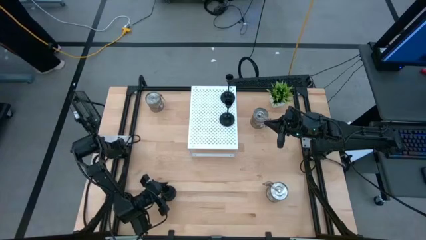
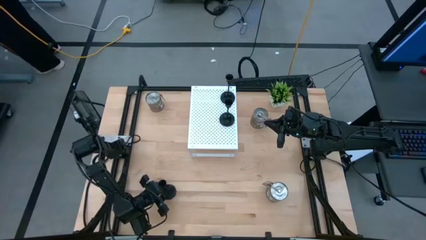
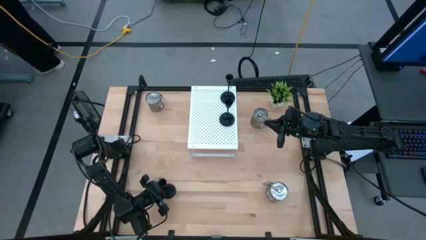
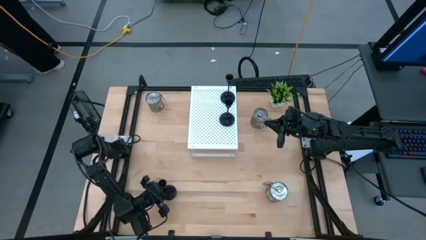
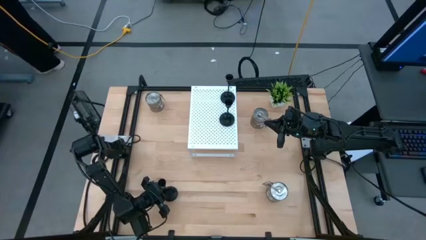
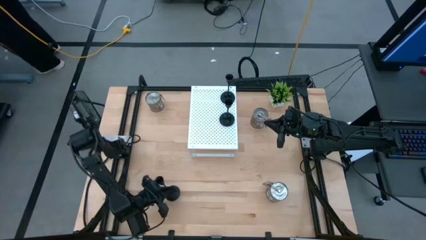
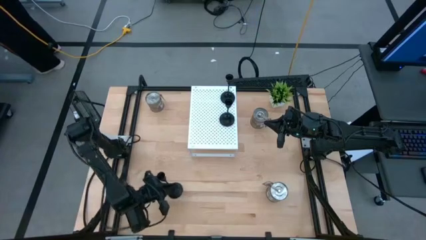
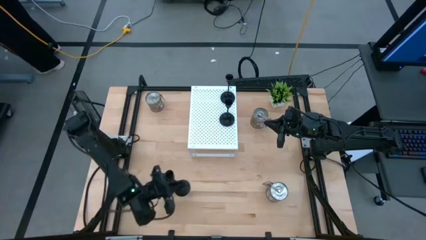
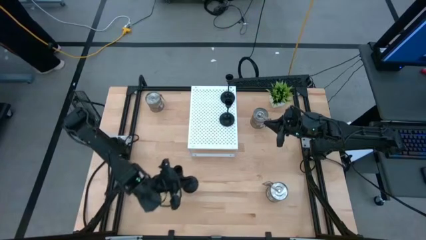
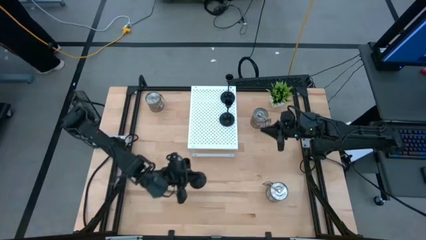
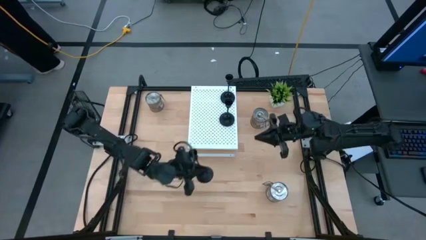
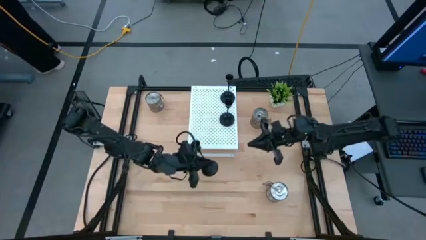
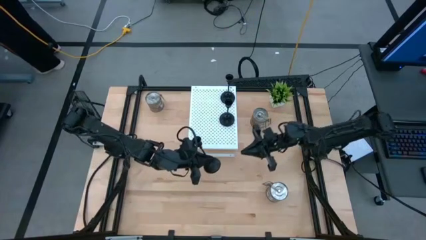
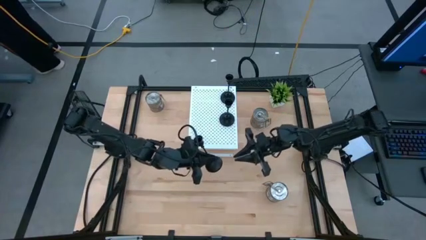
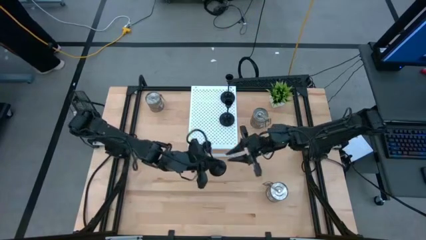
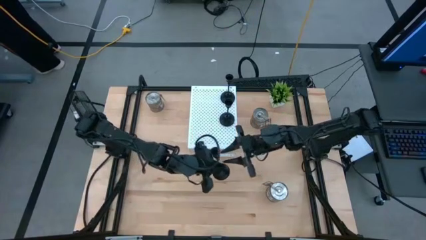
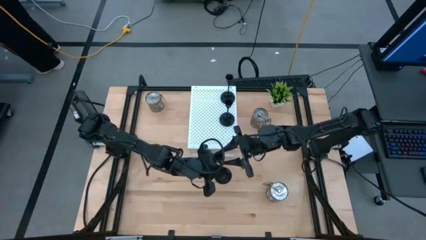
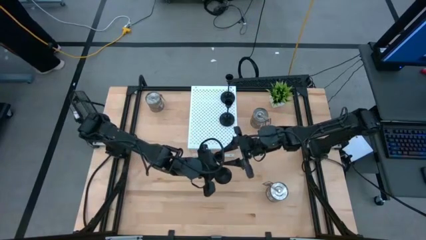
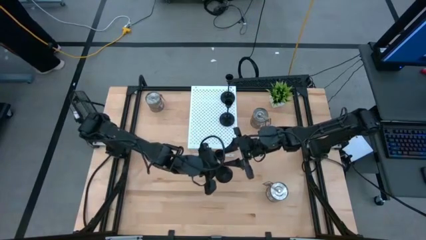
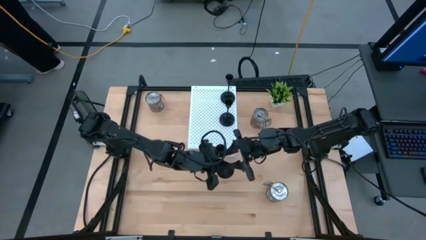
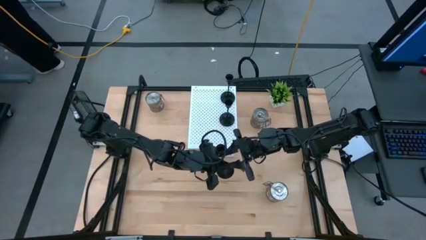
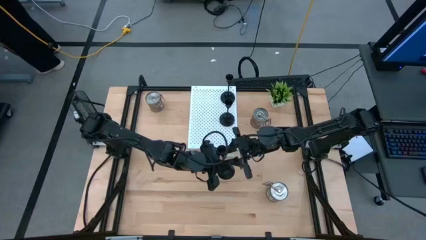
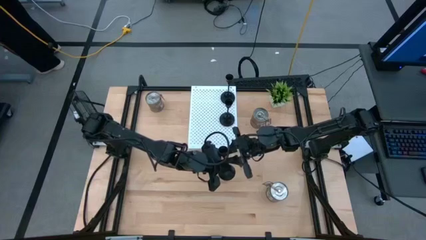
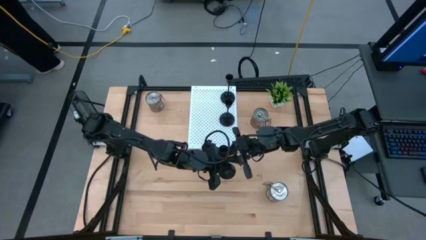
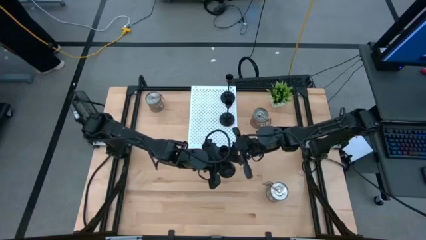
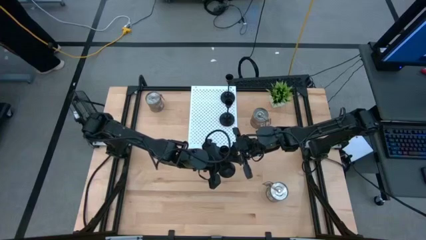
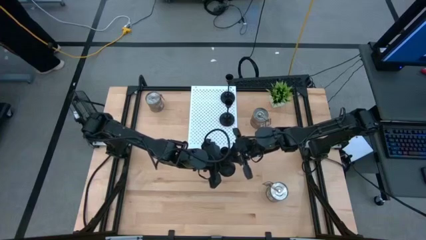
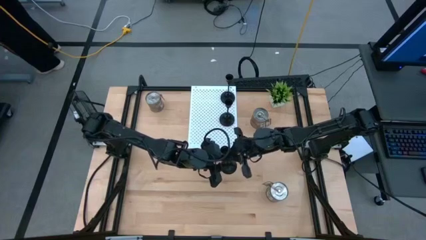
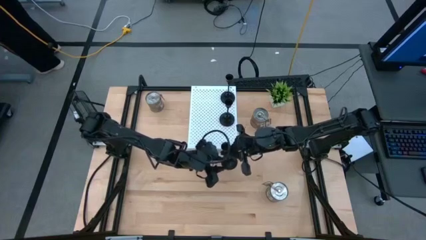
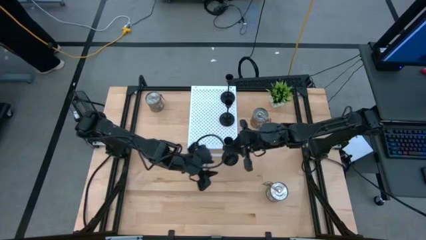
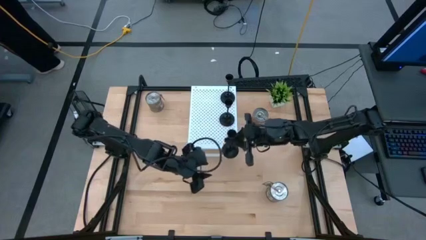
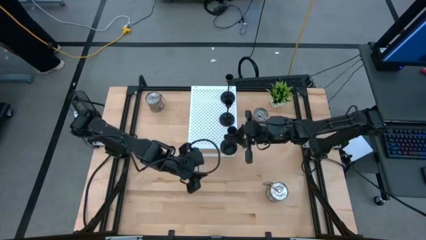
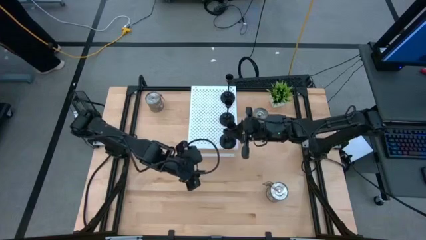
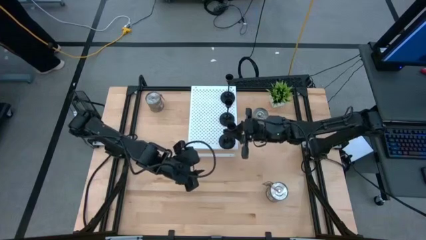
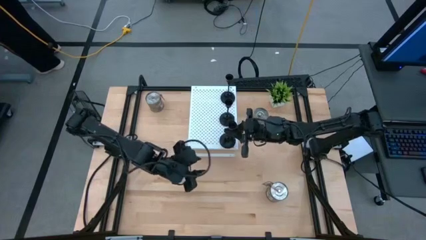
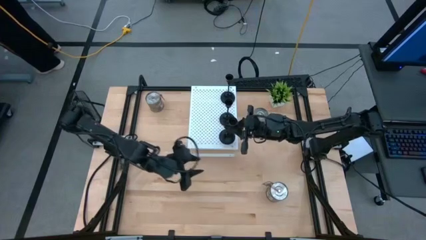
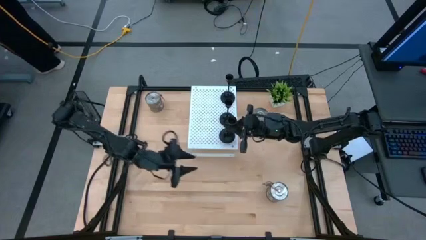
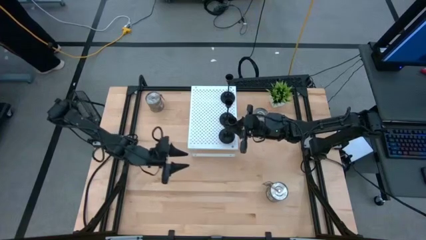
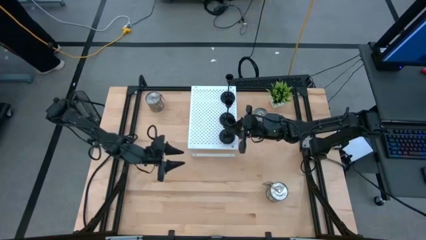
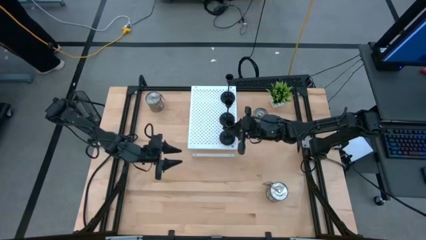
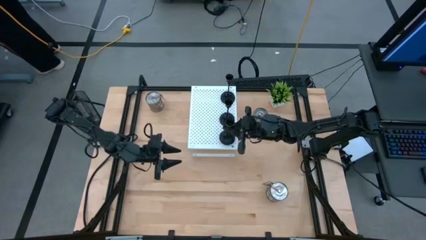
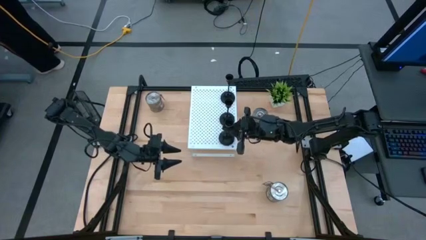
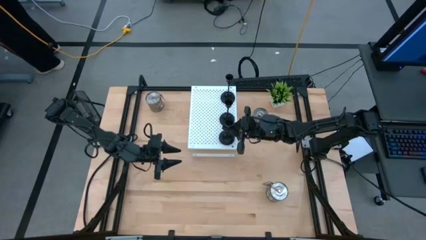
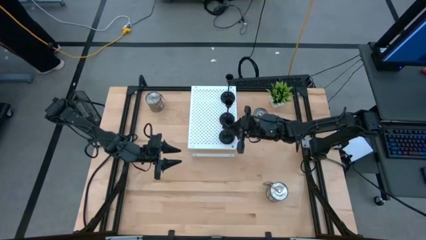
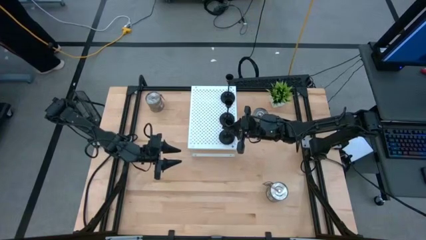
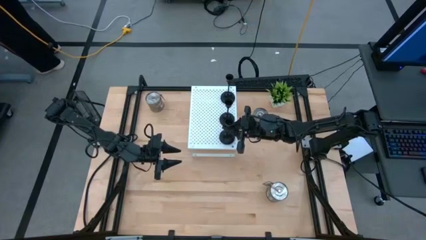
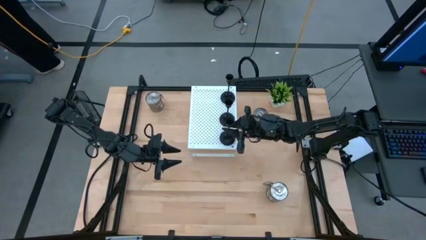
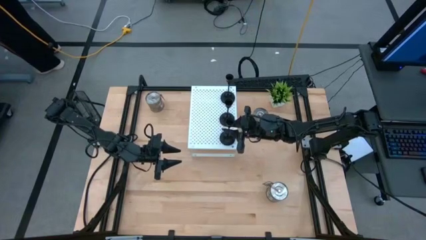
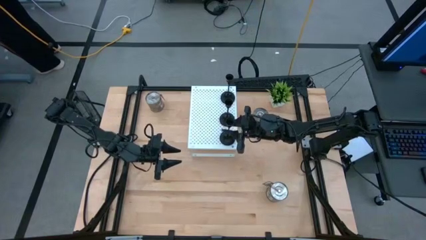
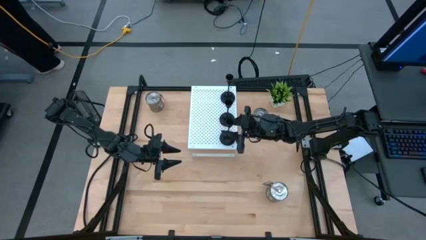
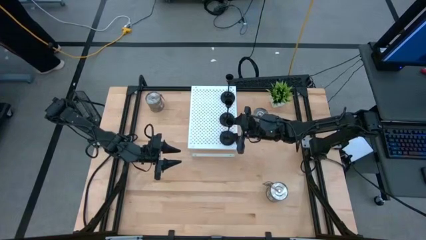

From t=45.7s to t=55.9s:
Task: Pick & Place candle stick holders
Put the black candle holder on the shelf aligned with the other candle holders

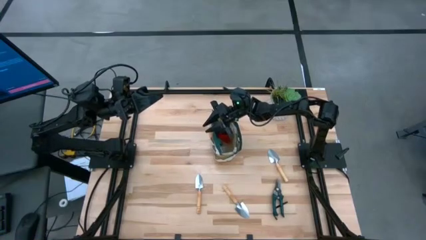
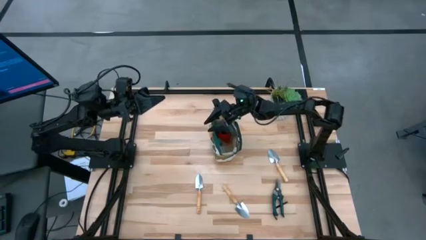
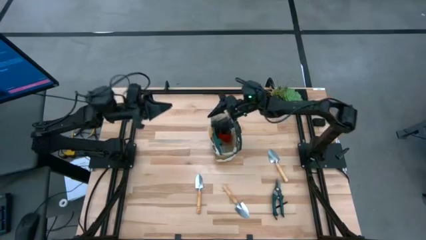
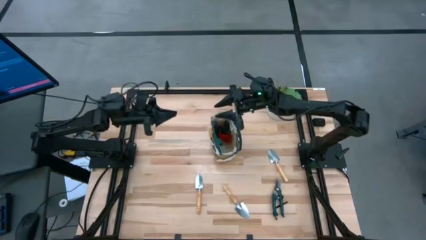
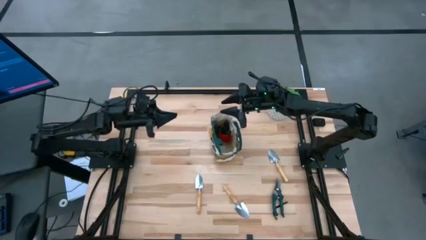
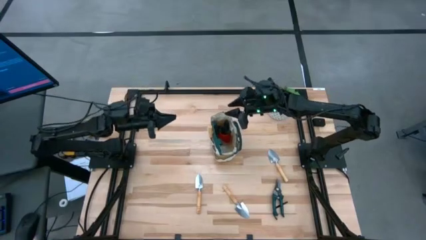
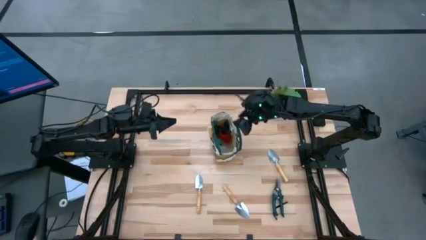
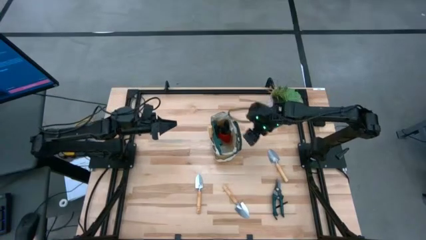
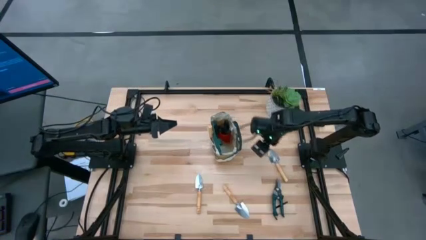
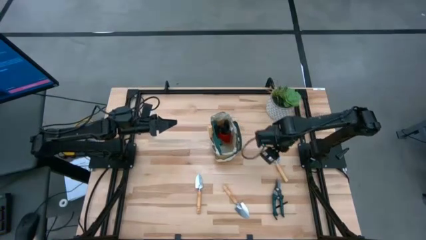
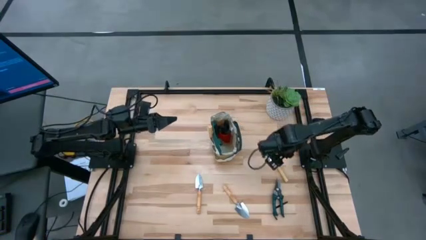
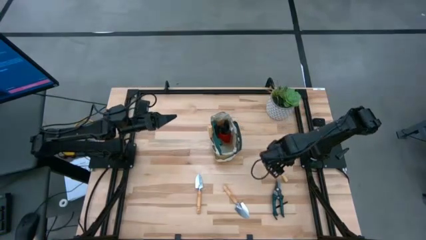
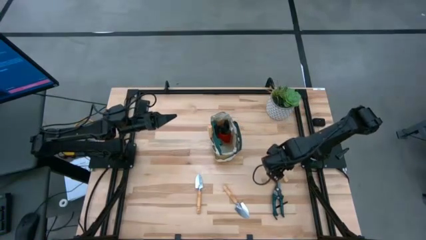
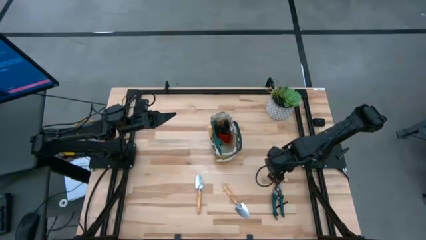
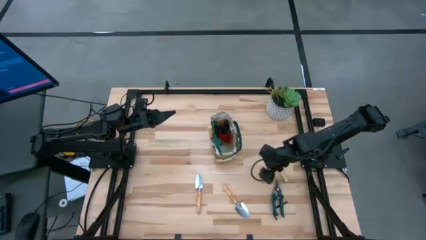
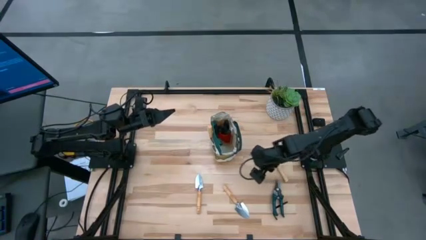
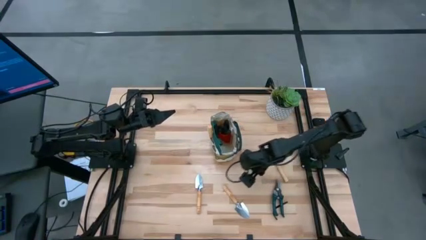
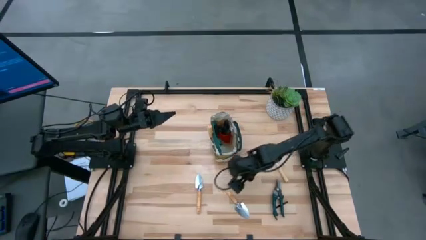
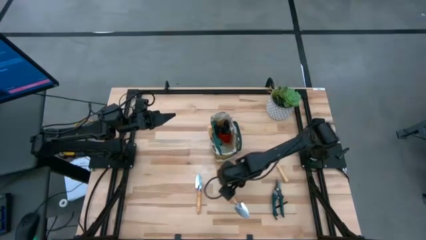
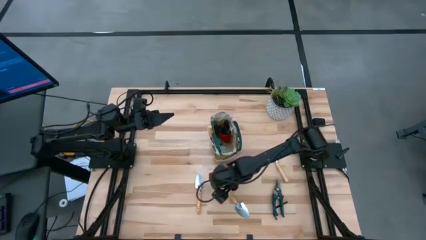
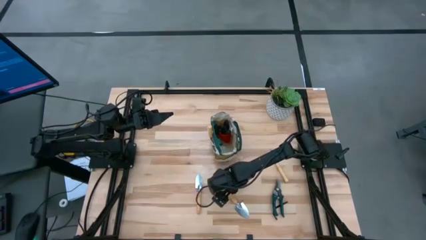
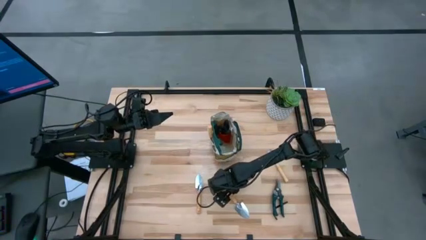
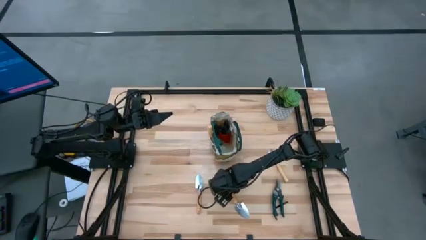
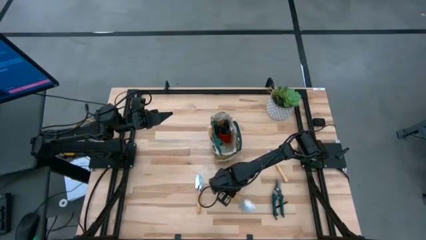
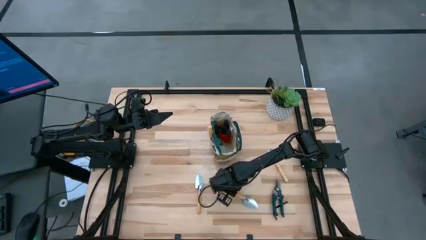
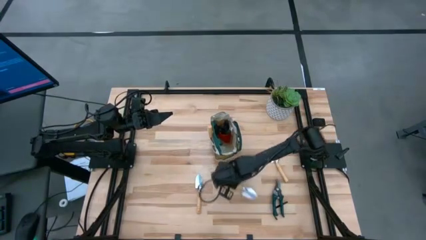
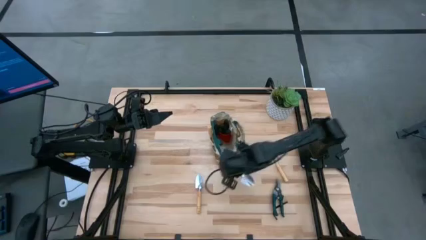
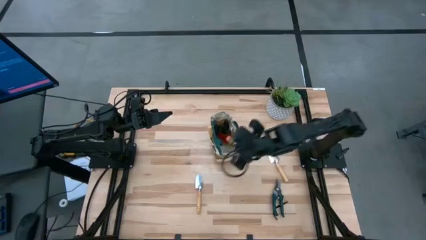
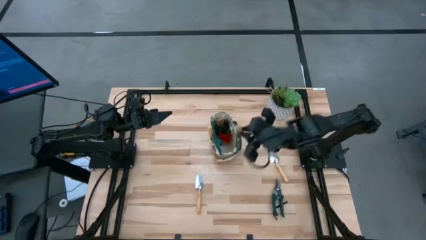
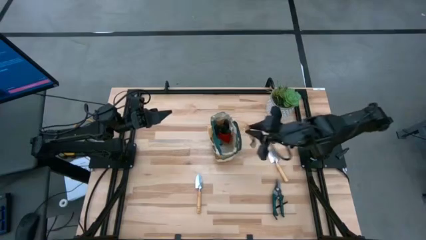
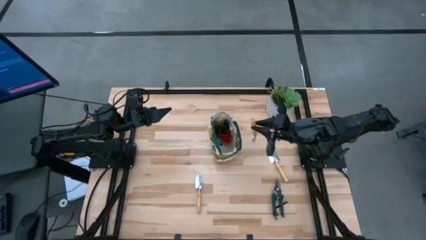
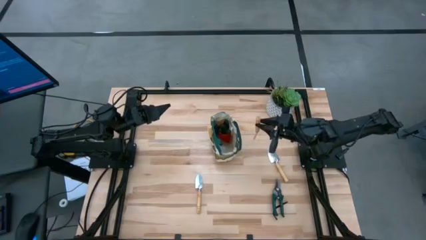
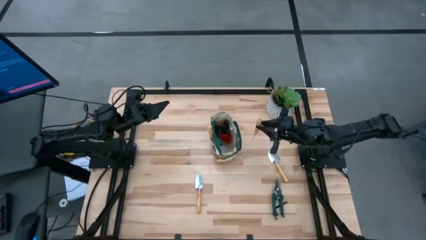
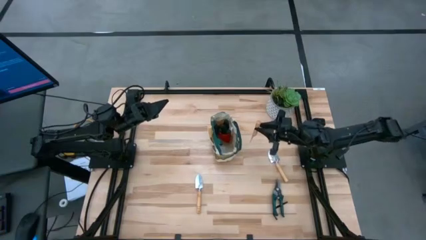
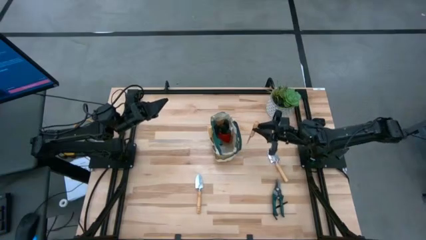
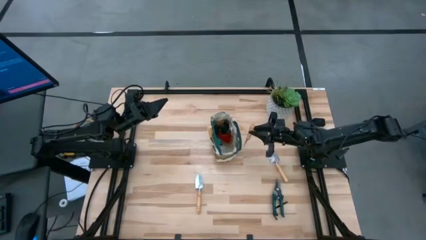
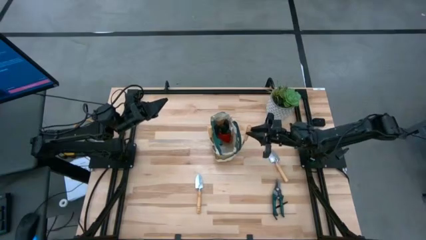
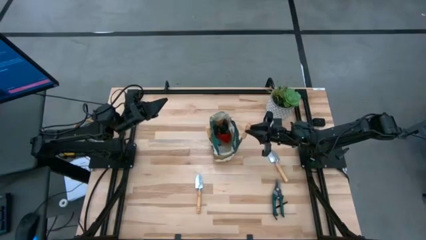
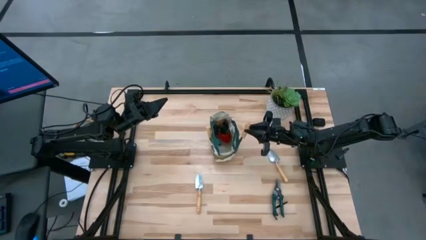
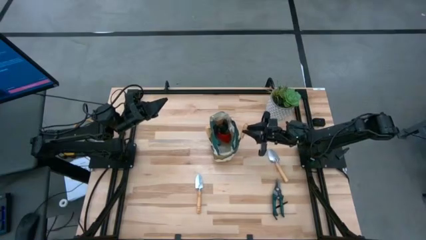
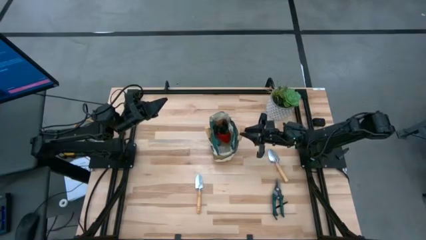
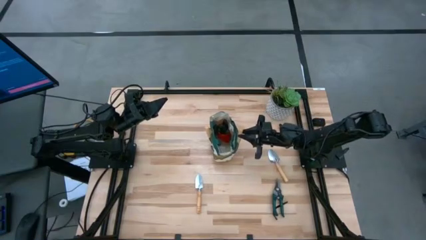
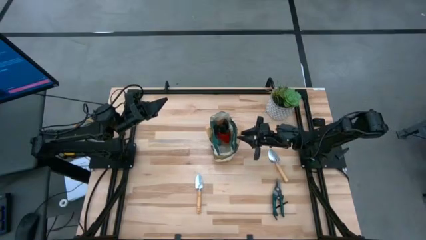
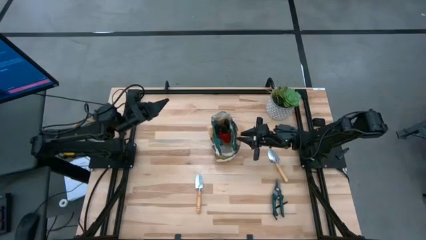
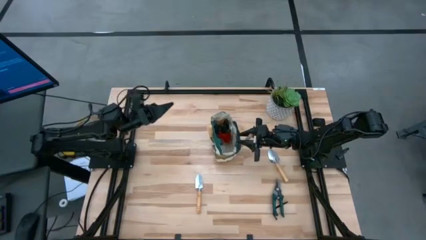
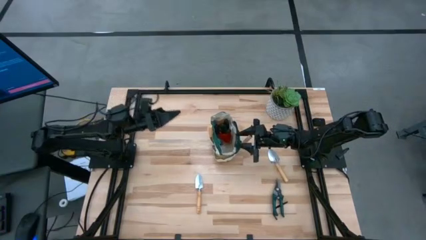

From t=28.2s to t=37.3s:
Task: Pick & Place Garden tools in Gardening bag
Put the brown trowel into the gardening bag
